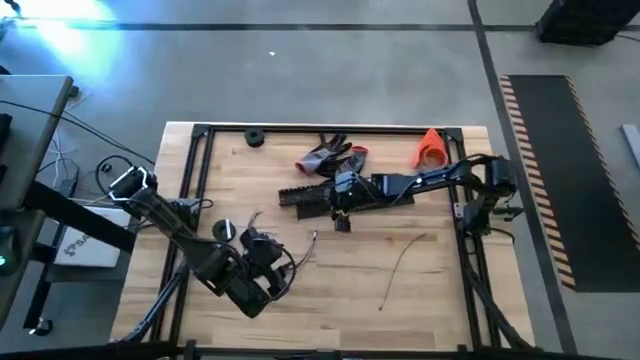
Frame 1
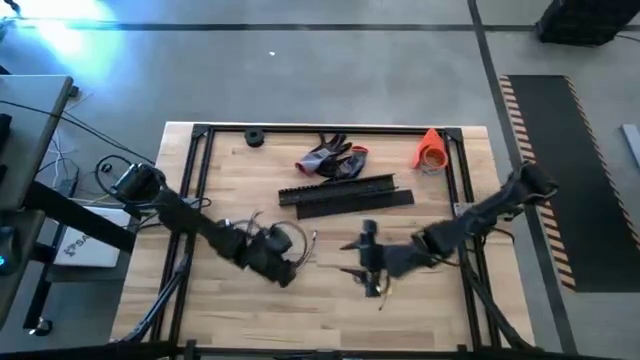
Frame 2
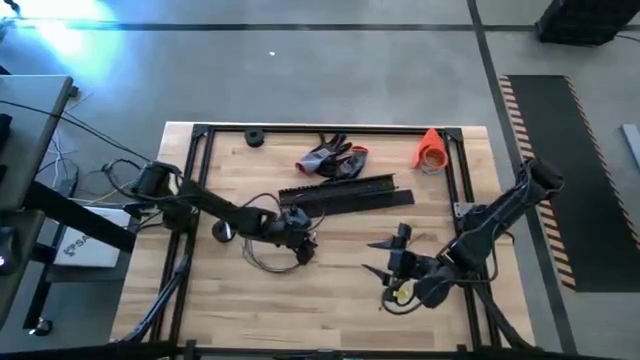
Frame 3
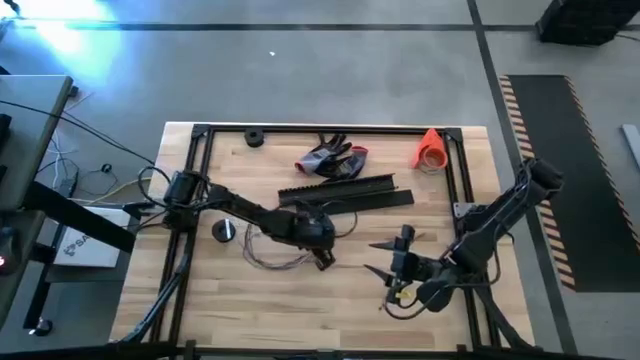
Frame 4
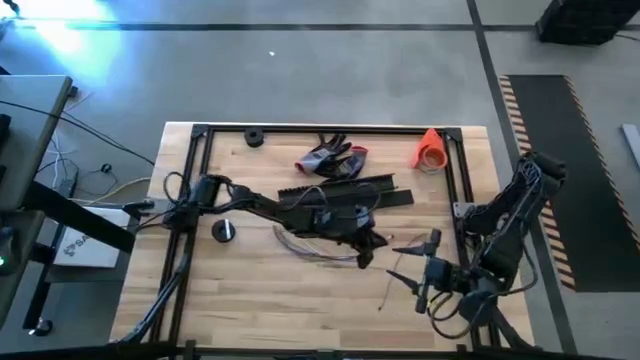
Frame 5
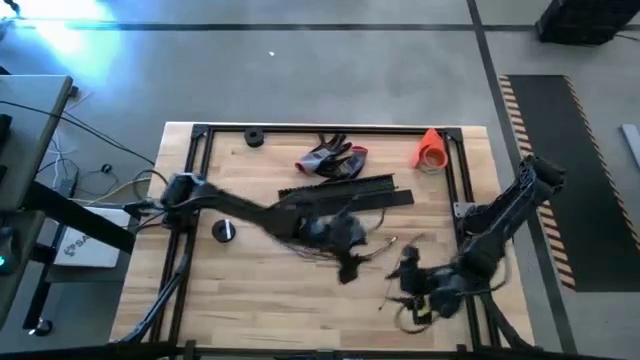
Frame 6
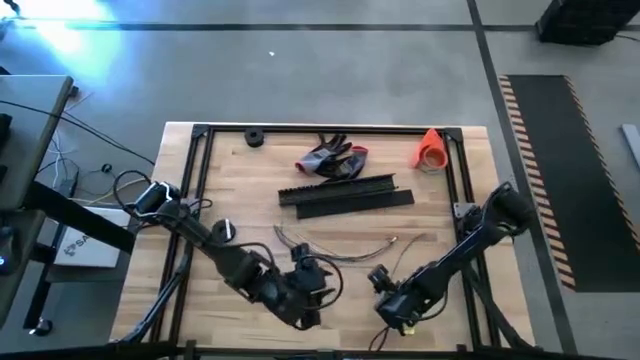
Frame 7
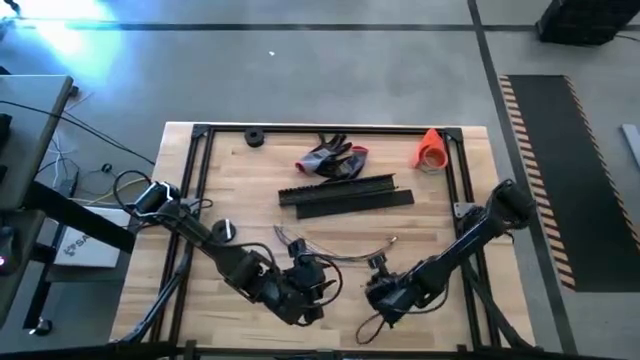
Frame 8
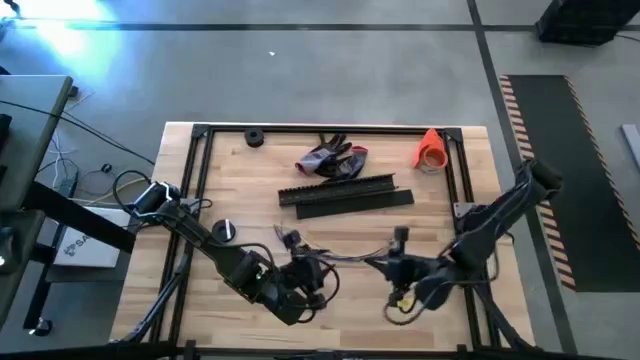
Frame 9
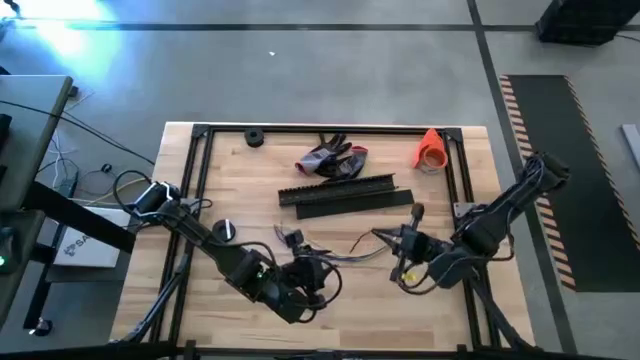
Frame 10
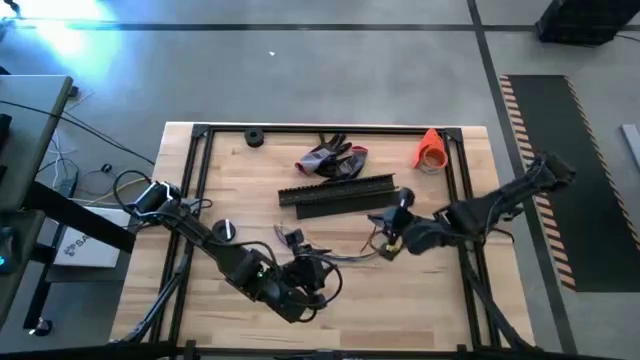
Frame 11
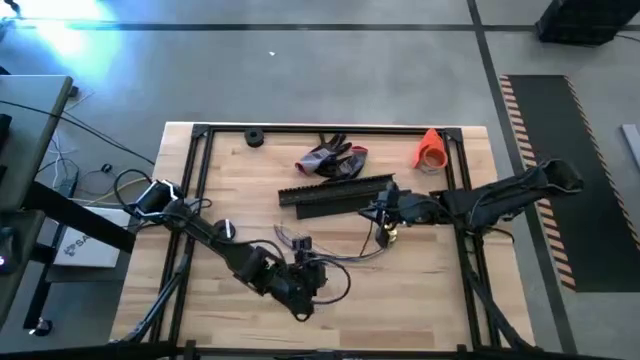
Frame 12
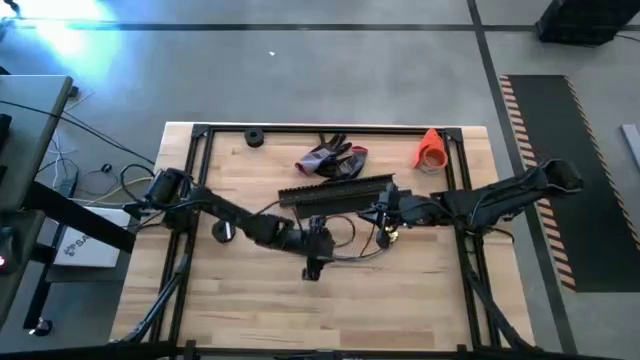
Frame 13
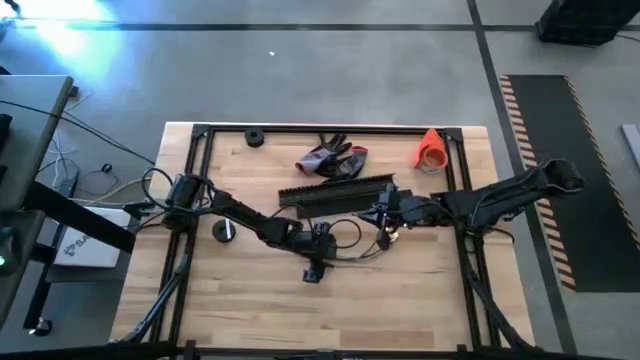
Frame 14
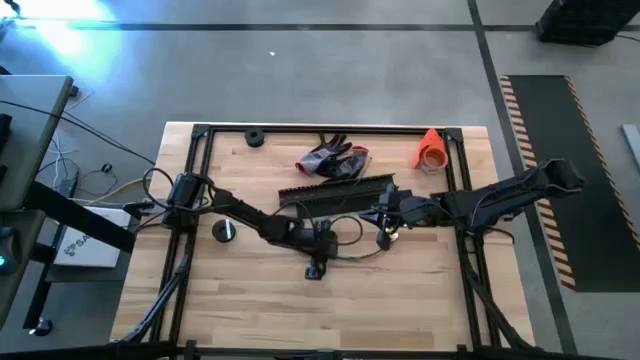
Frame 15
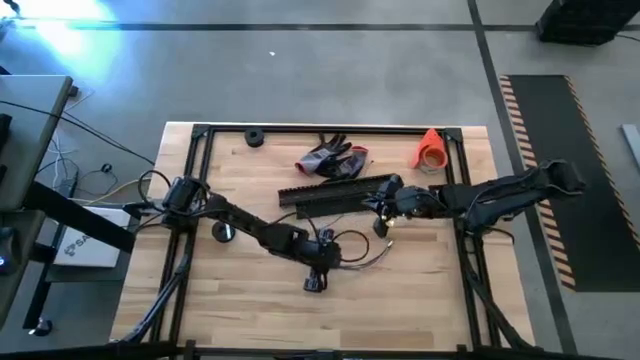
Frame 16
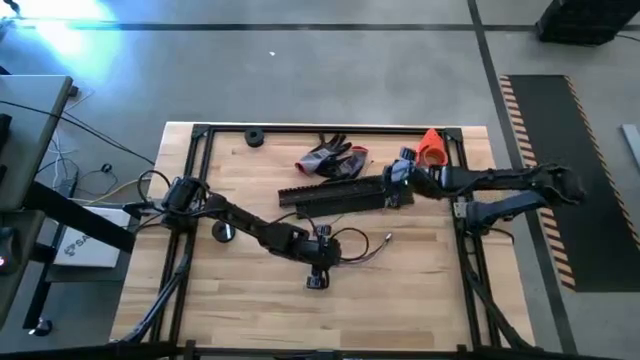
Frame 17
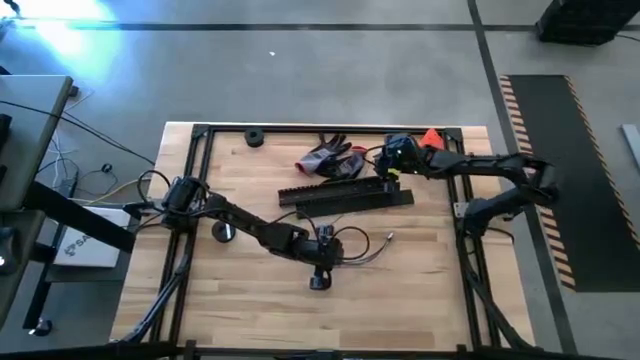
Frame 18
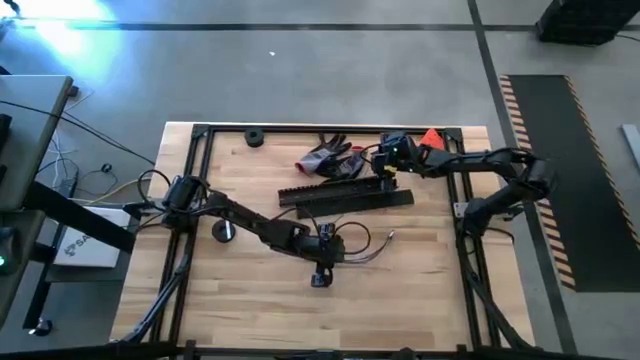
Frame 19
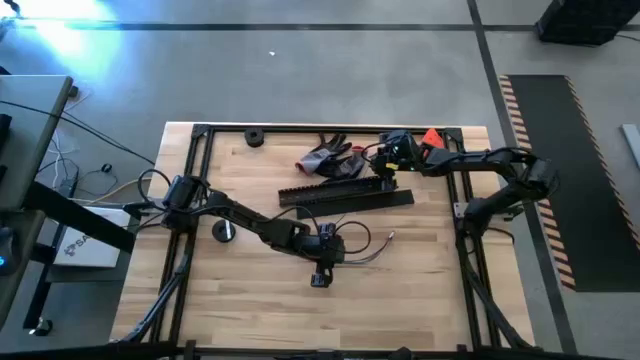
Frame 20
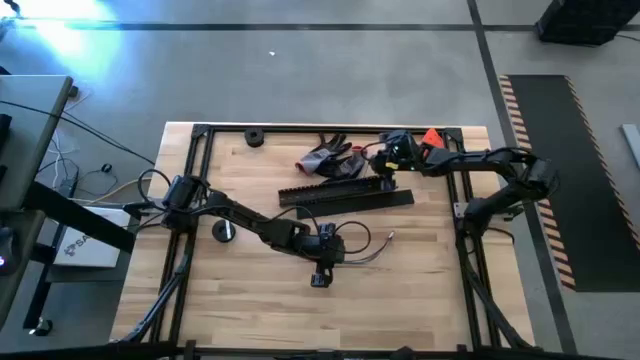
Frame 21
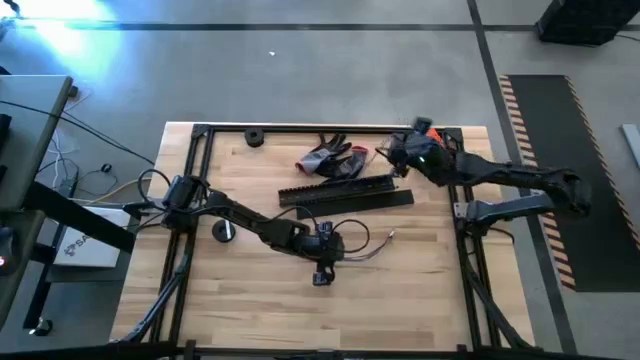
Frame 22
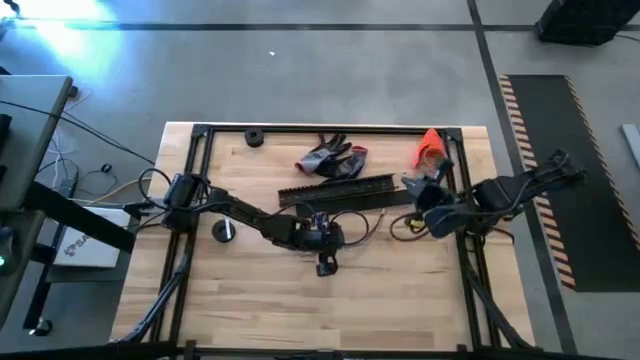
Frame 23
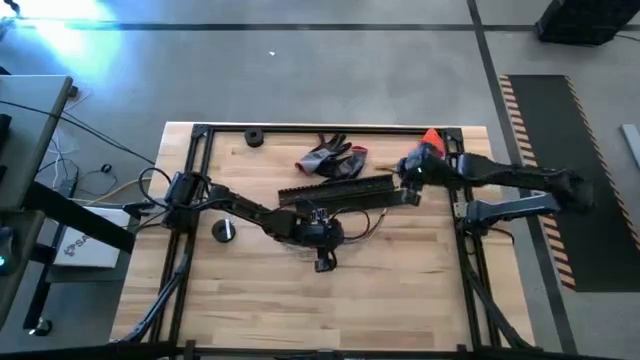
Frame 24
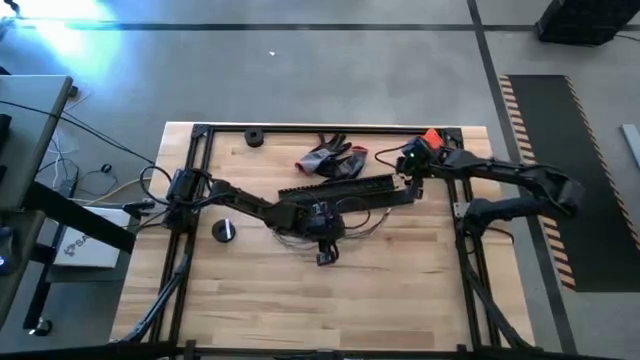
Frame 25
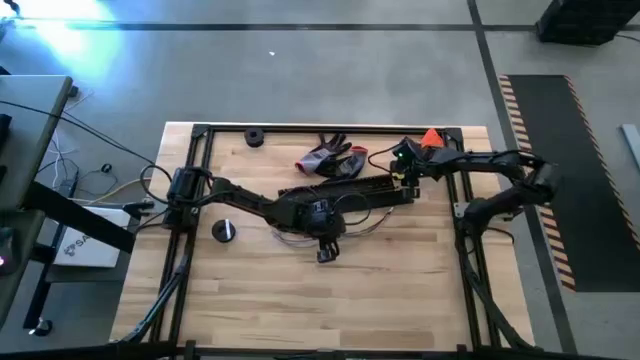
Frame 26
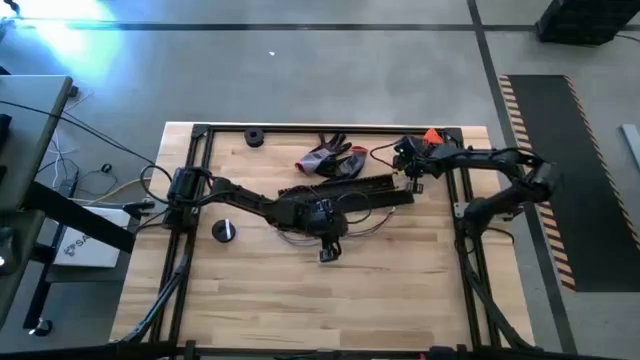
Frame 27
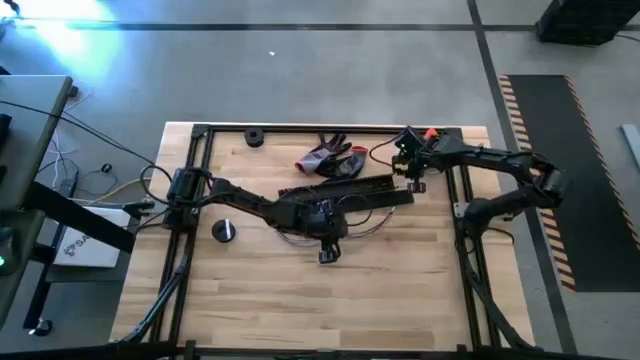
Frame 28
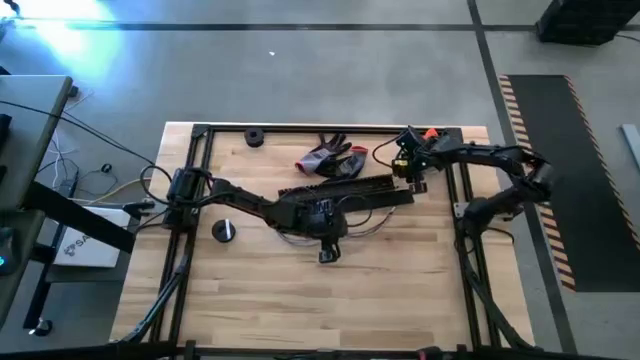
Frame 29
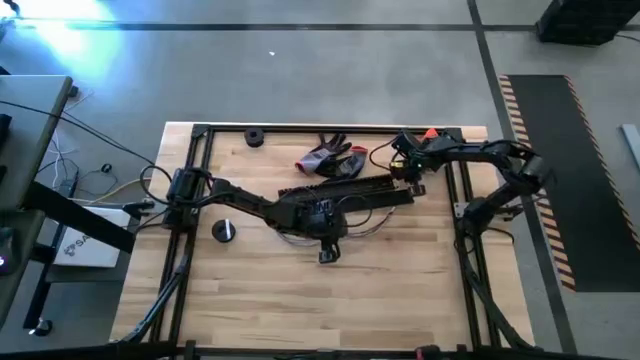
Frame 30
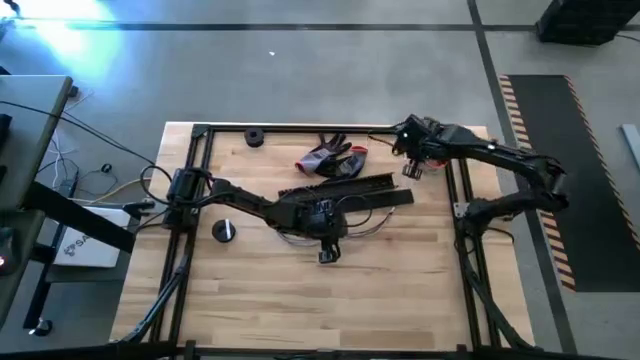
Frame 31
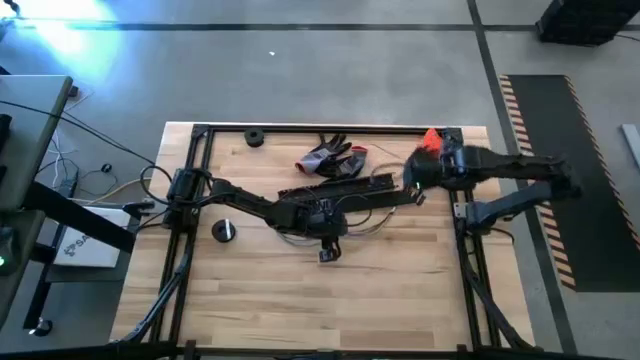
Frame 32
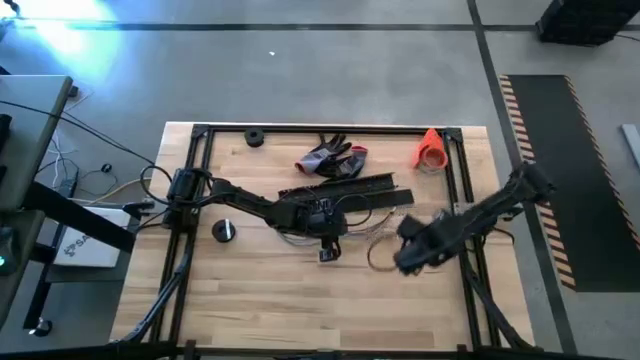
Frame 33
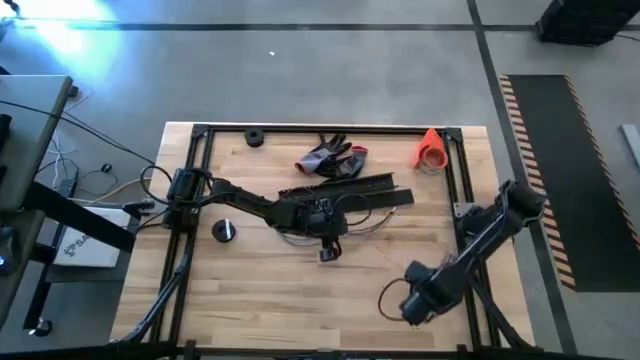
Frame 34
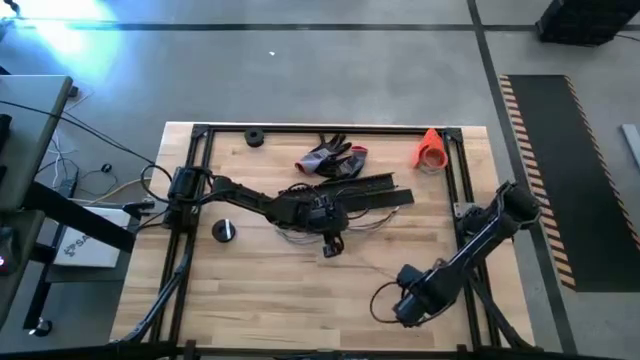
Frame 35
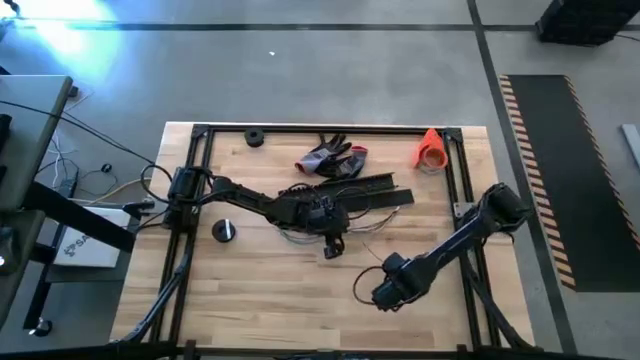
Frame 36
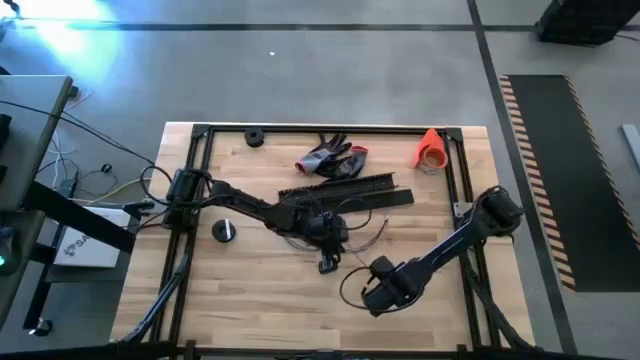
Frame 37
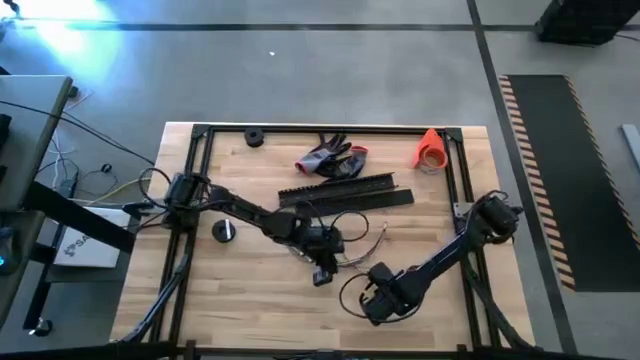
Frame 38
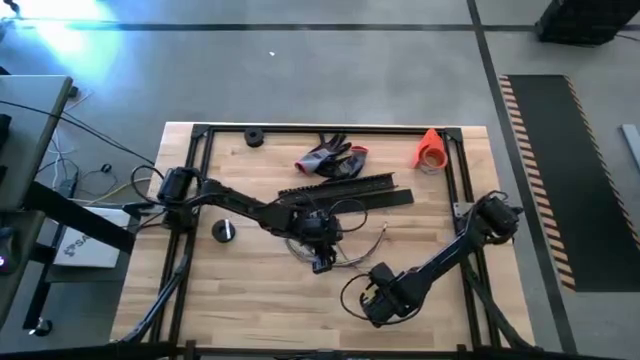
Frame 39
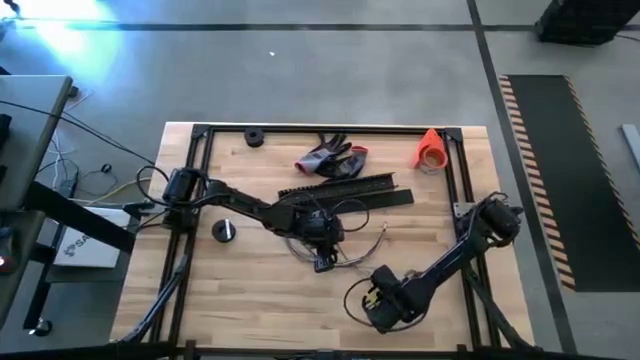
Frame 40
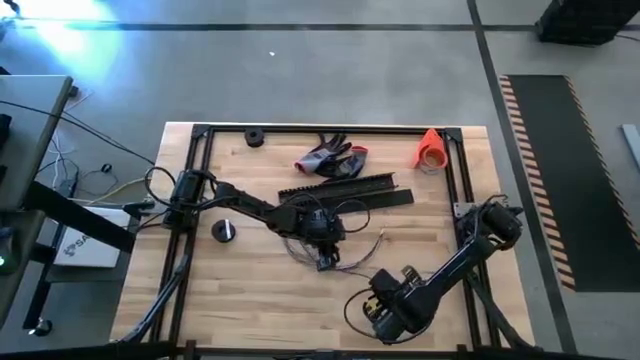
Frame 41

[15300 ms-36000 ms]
Task: Ziptie cables
Wrap the cables using a black zip tie
